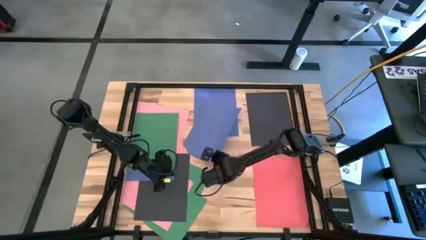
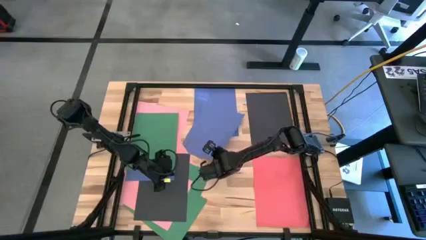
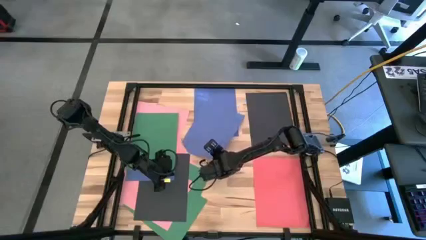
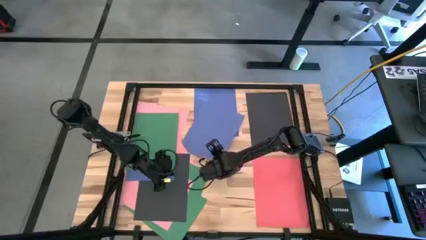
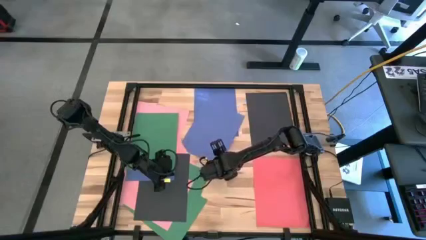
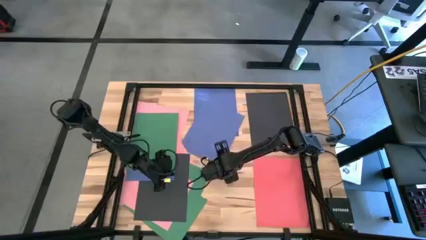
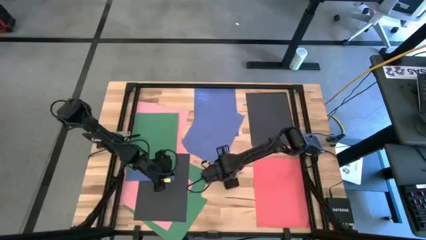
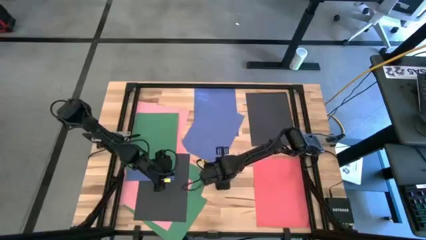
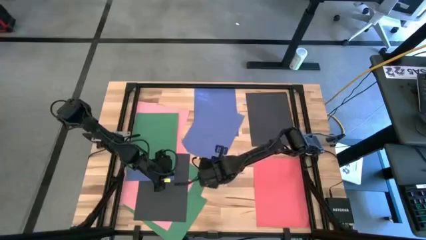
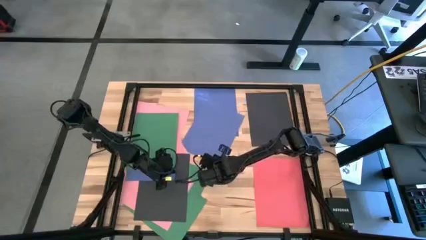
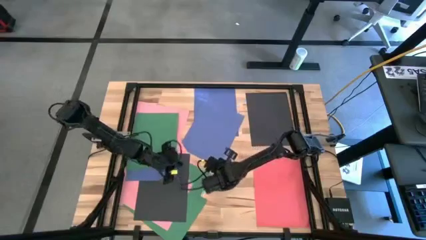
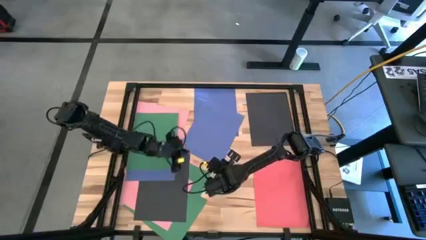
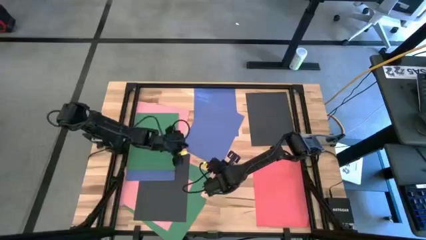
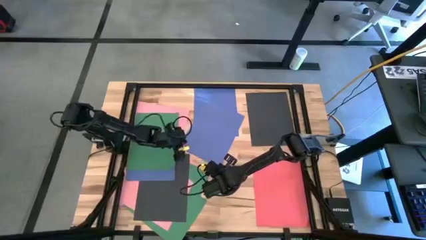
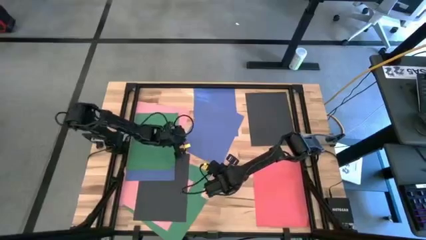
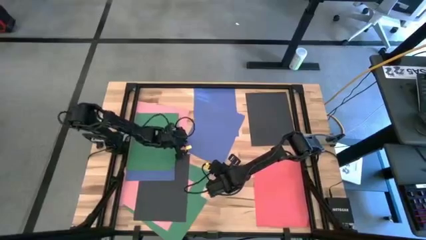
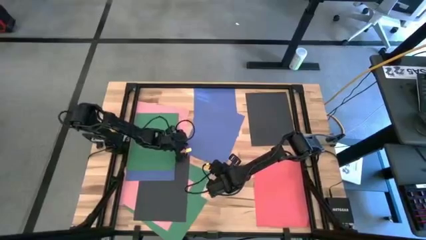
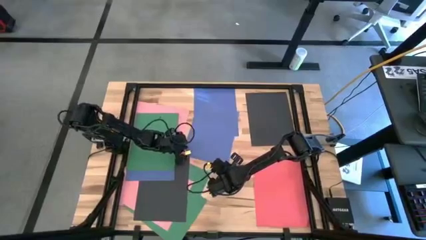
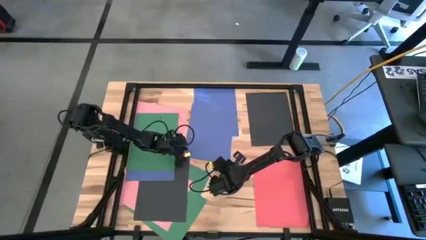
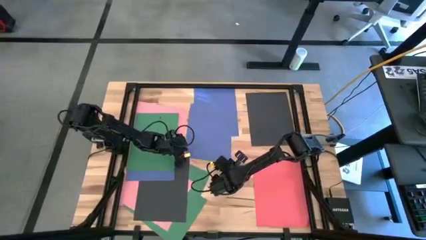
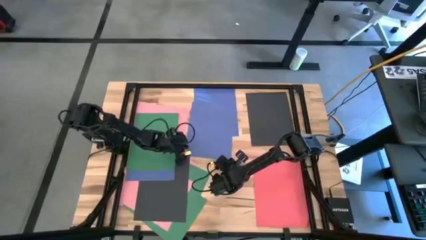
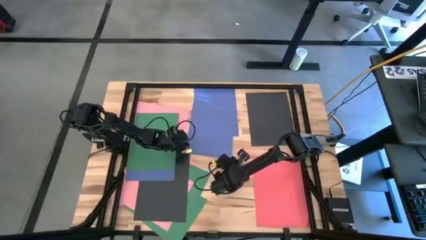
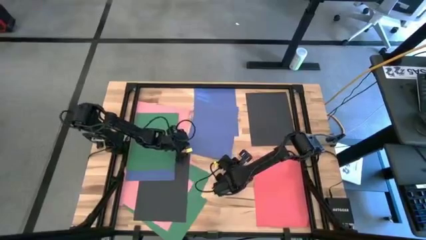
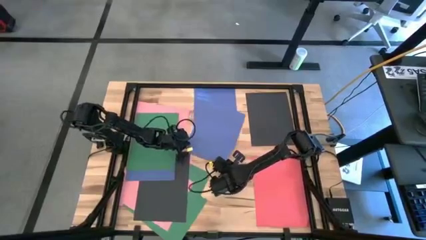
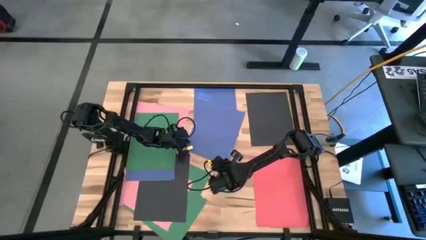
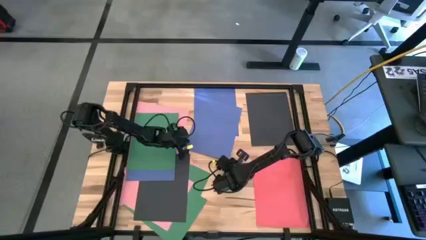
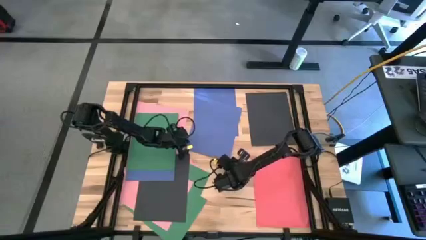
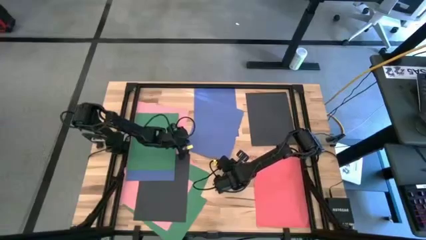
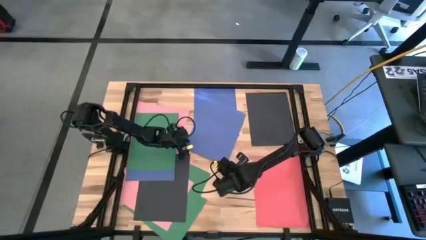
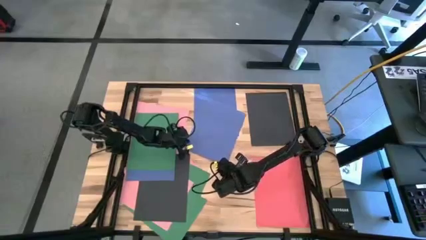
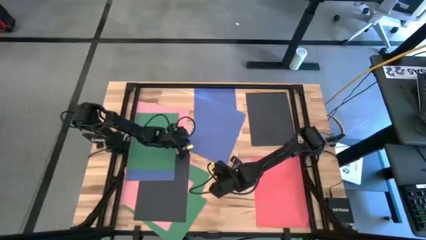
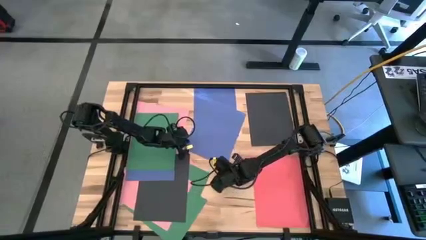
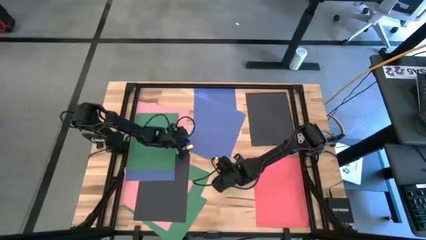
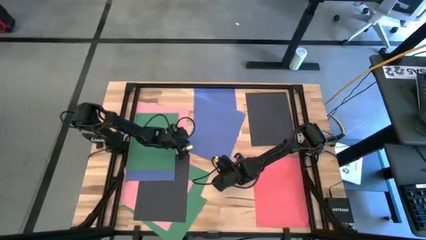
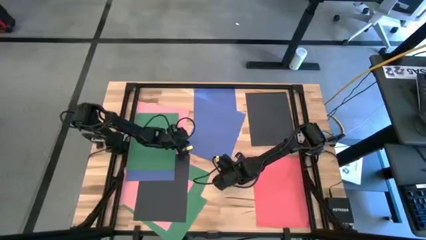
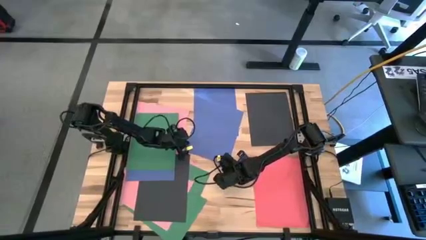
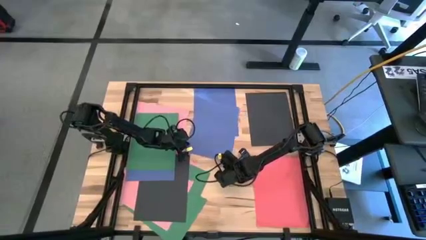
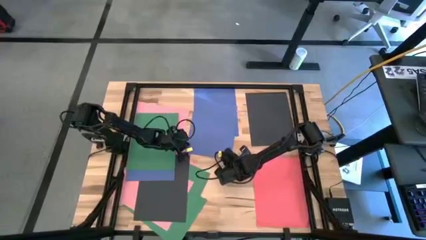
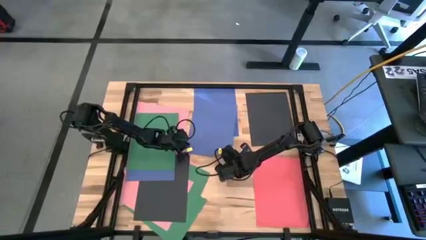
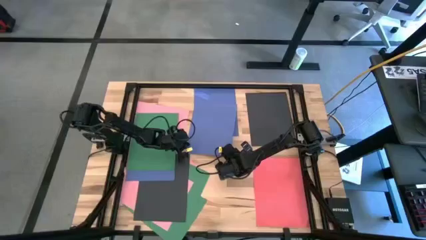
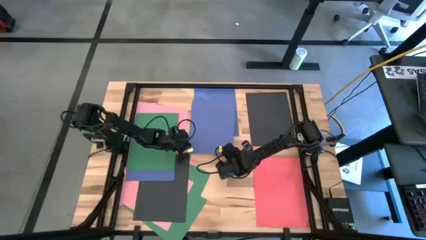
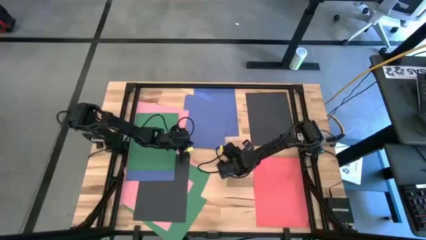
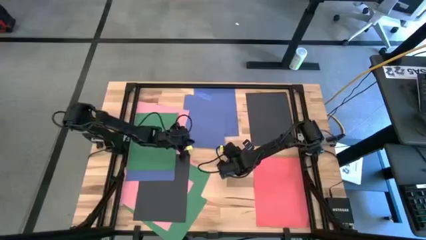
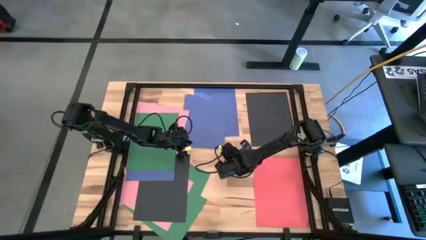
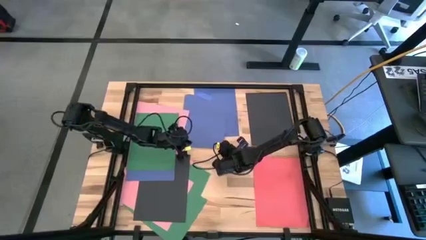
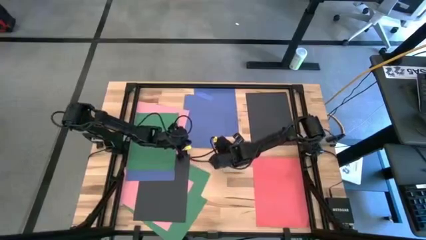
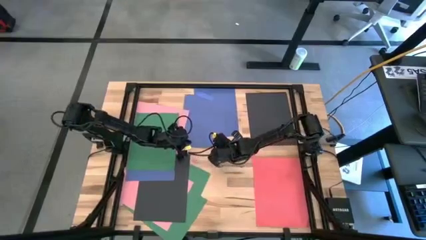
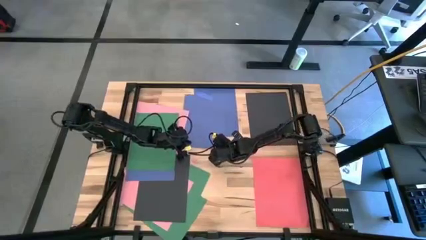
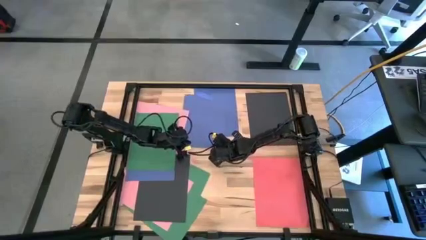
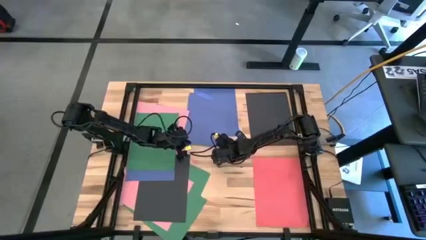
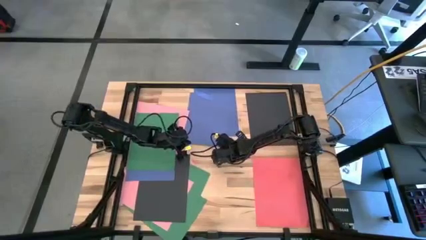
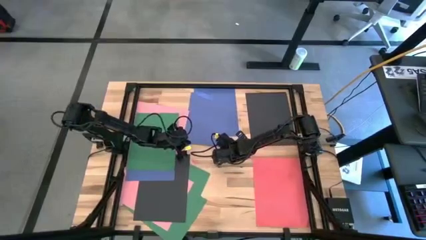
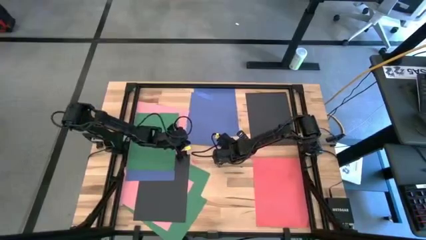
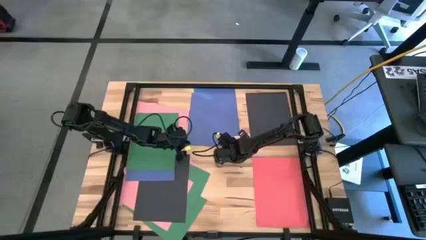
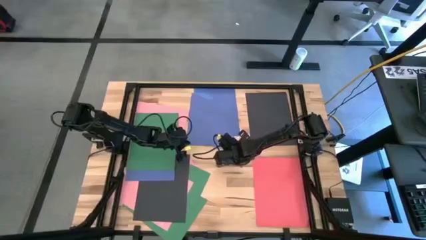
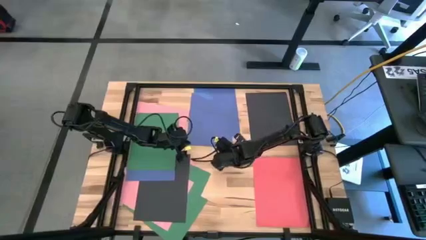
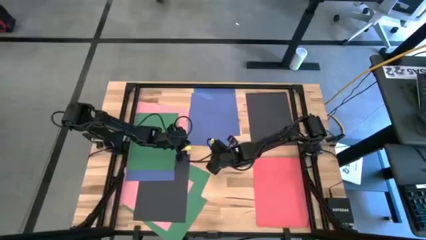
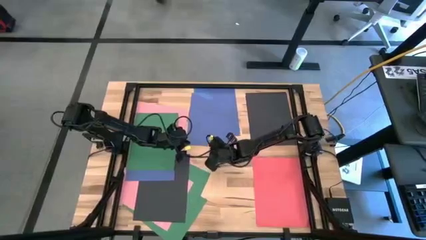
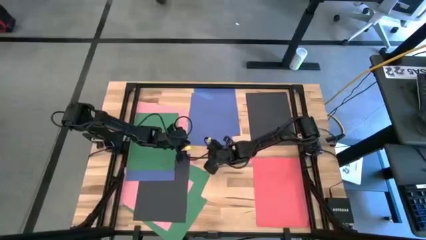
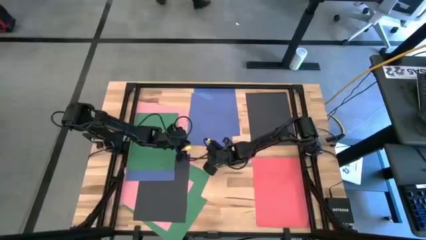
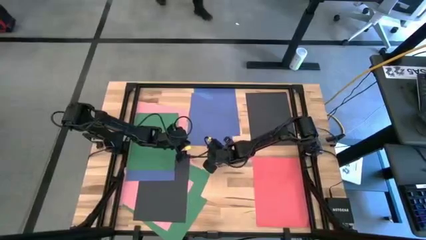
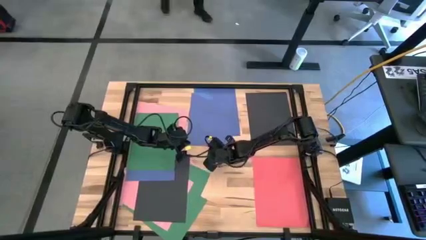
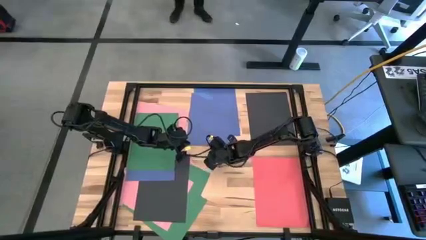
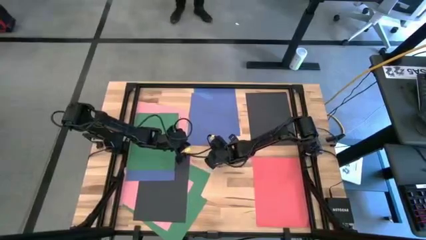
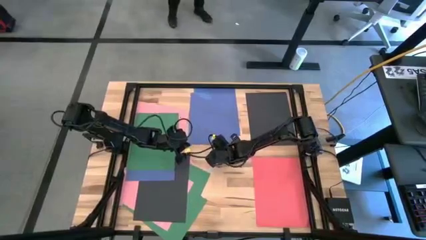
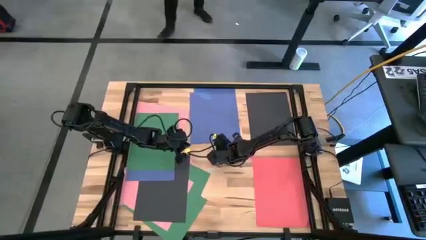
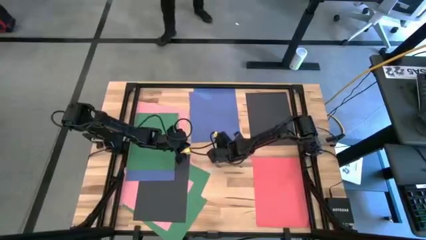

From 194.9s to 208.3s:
Task: Organize paper
Stack the blue paper on top of the other blue paper on the table

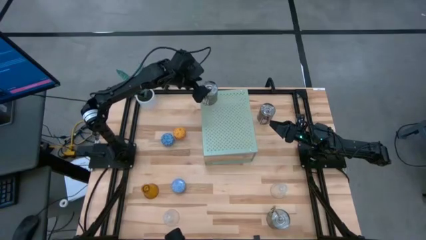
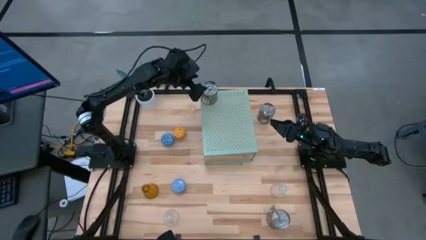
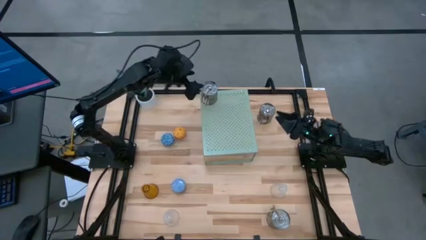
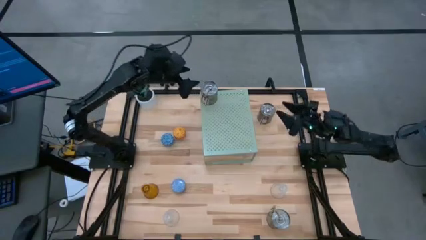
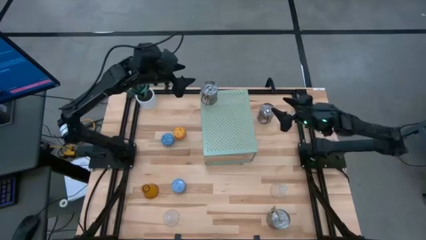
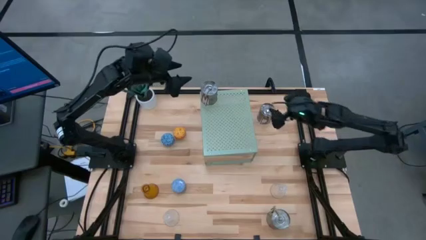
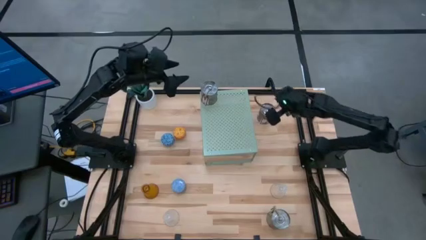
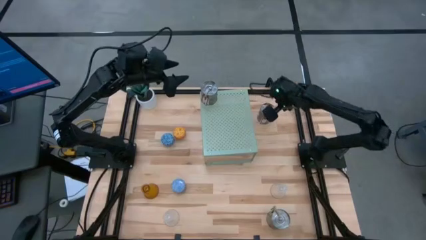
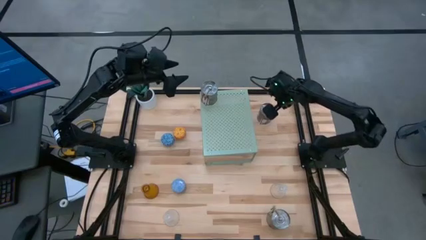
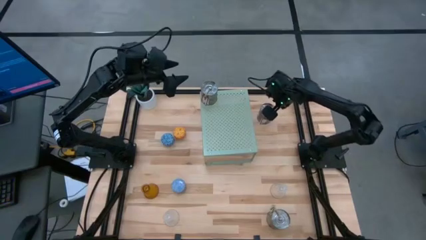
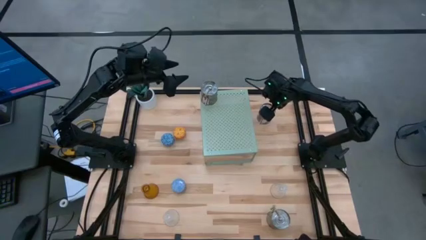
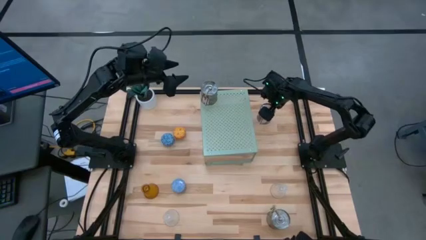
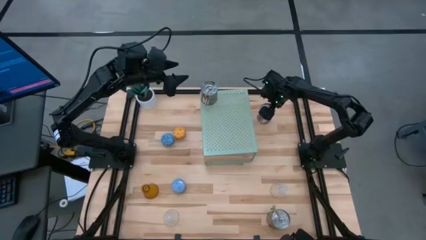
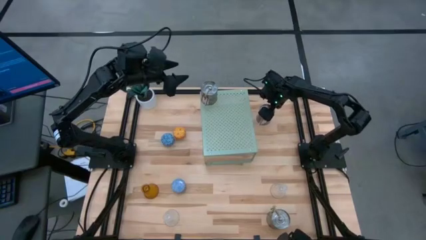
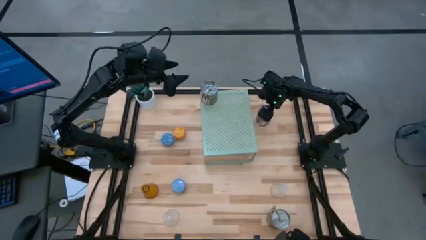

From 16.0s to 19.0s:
Task: Pick & Place candle stick holders
Put the top silver scented candle on the shelf
